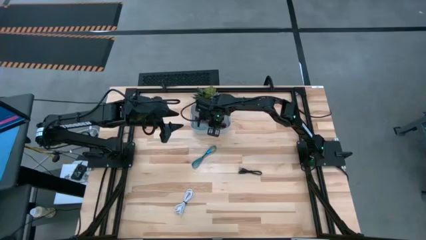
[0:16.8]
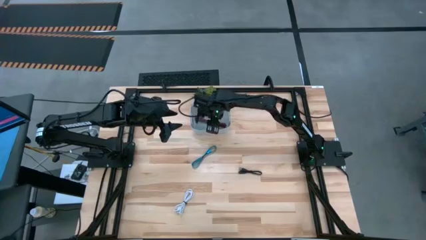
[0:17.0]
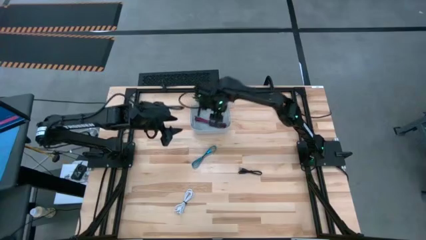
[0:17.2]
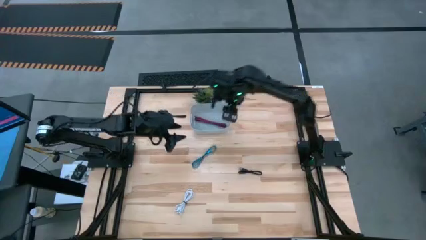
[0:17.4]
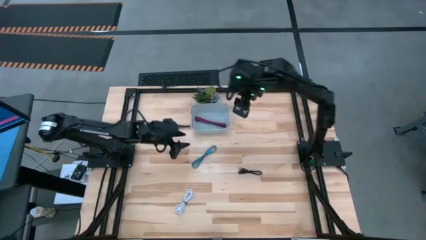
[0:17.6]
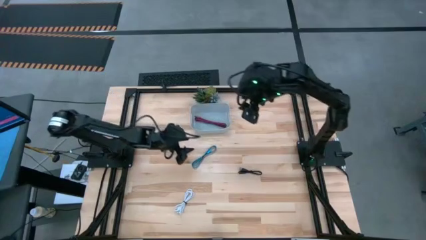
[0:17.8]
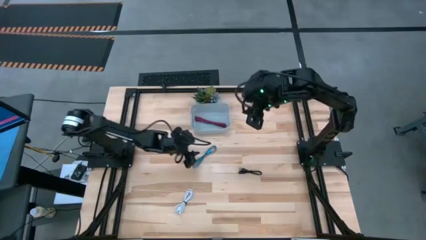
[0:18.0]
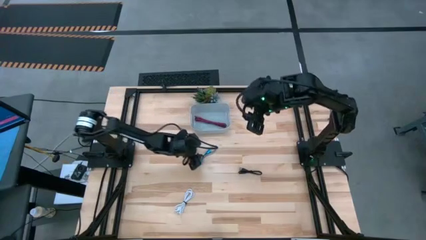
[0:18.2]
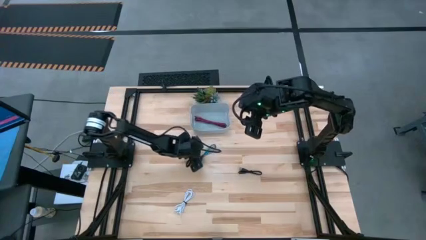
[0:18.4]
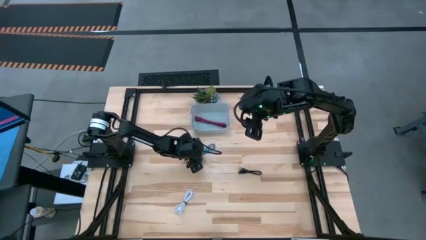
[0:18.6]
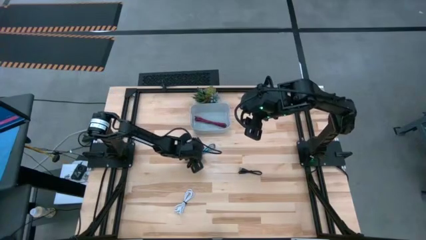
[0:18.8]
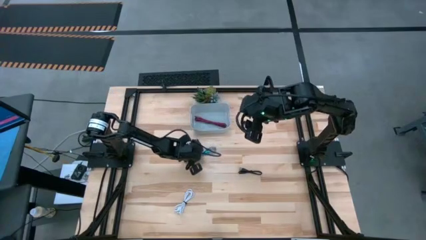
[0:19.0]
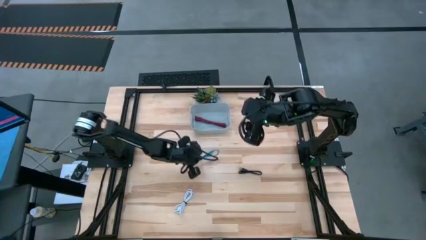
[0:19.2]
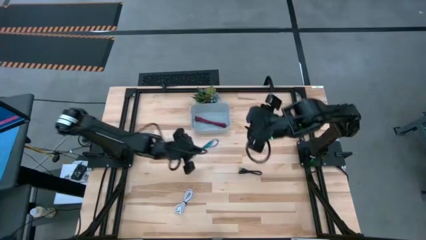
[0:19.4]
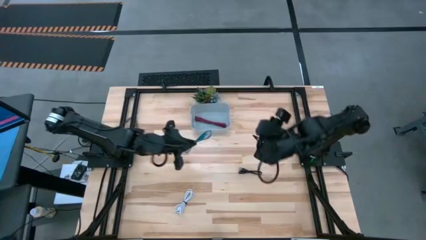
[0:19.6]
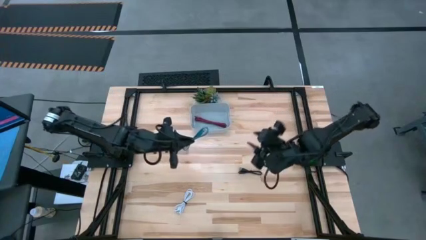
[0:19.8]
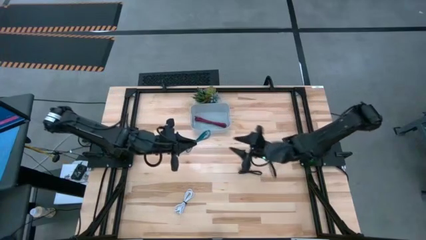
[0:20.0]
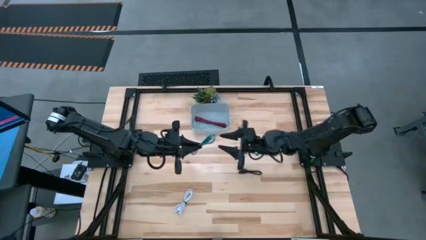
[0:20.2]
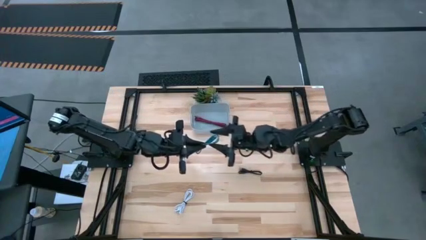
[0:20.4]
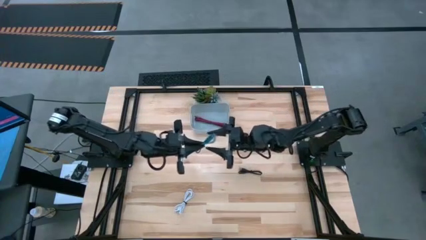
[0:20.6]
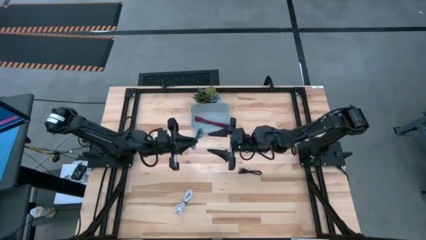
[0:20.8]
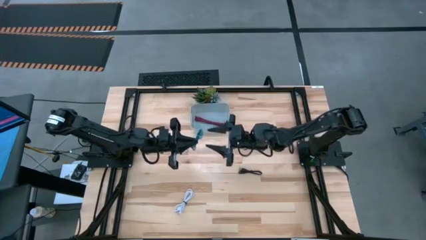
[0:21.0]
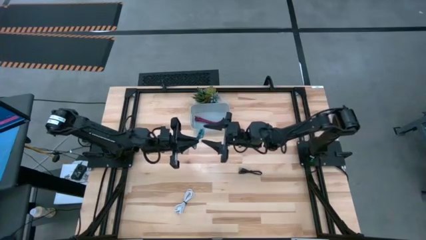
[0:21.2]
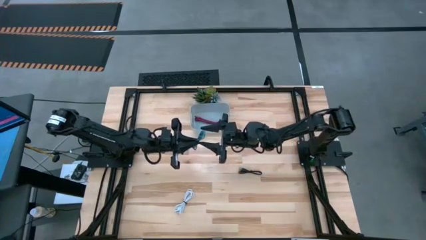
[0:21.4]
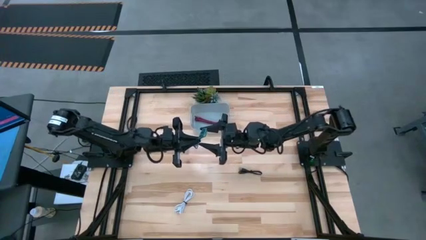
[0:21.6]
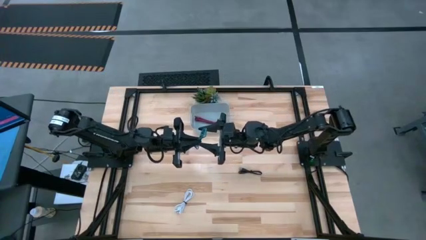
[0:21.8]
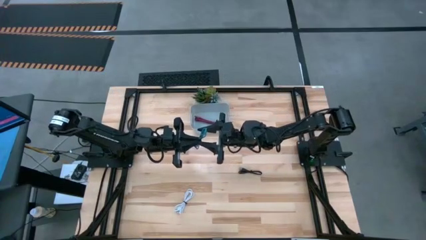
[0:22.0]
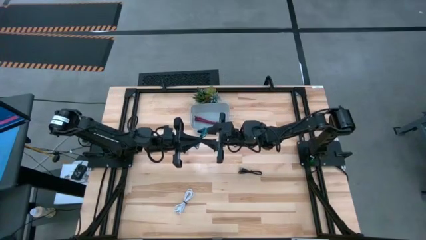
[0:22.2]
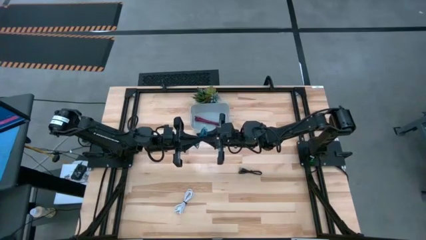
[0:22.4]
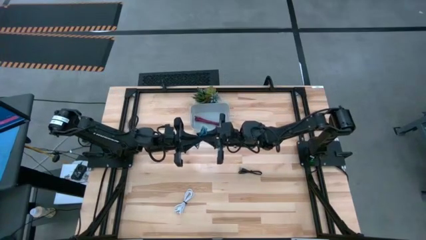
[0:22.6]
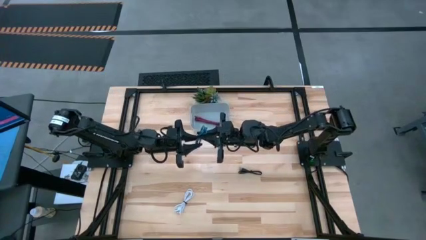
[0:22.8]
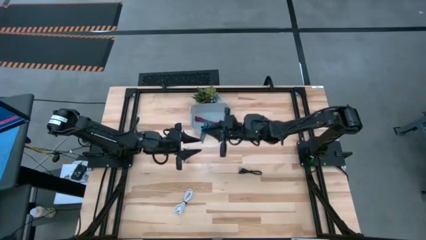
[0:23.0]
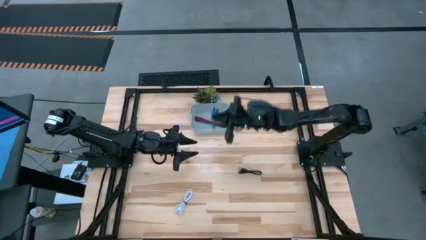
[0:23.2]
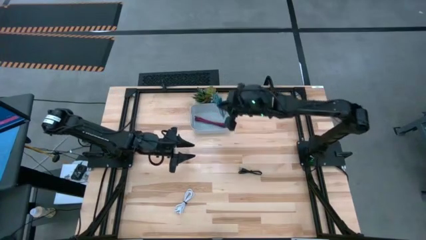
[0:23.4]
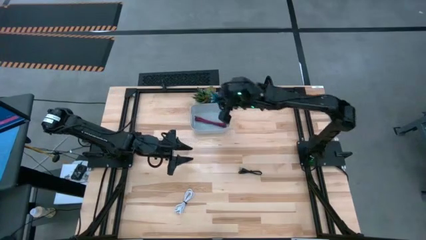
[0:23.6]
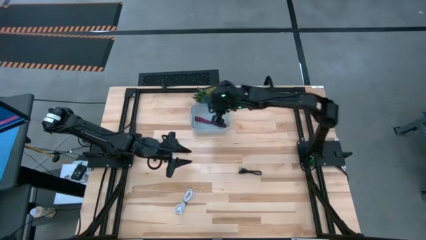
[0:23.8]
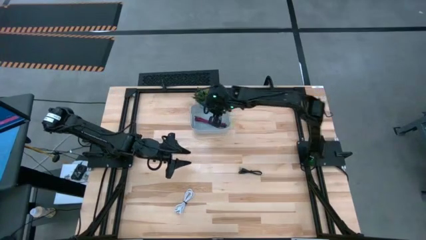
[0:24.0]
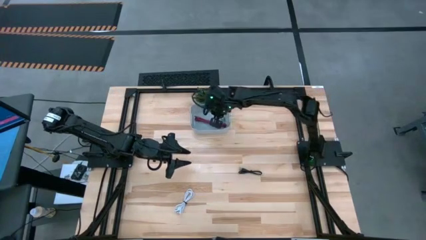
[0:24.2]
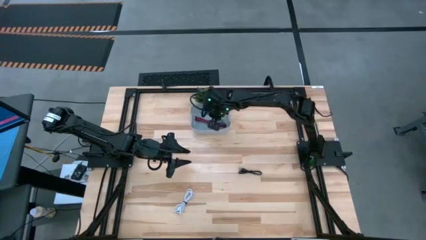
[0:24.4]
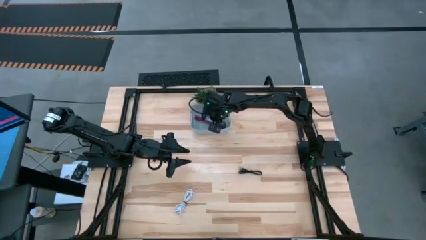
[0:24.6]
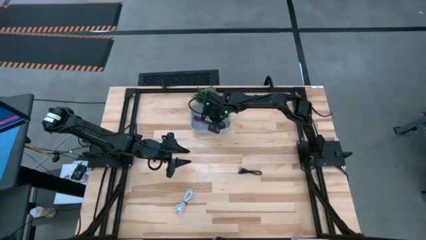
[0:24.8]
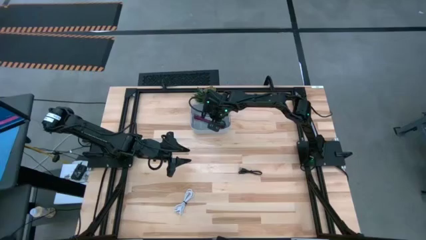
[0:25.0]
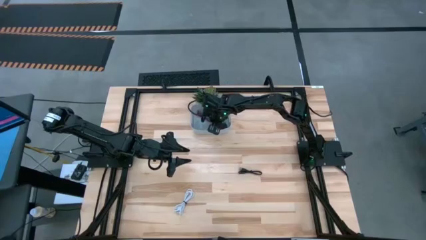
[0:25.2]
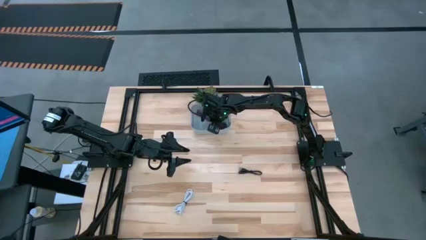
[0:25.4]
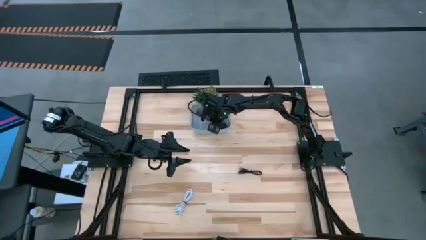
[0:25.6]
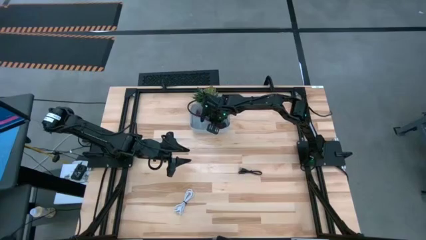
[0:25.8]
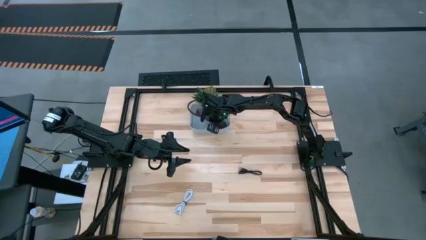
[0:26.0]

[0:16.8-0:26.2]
Task: Pick and place USB-C Cables
Put the blue charger cable into the gray bin
